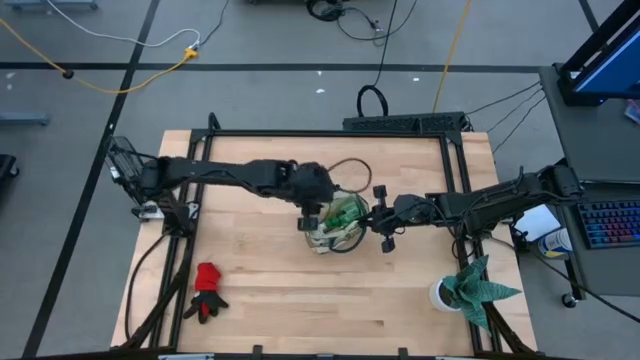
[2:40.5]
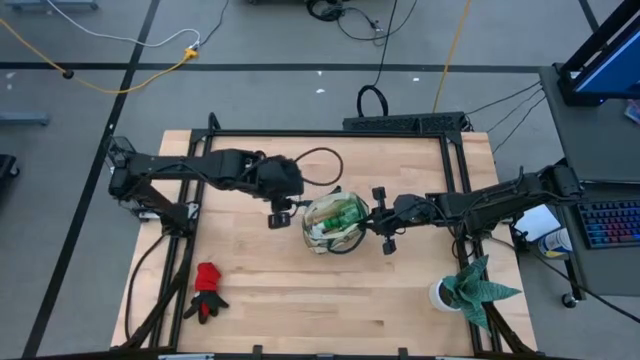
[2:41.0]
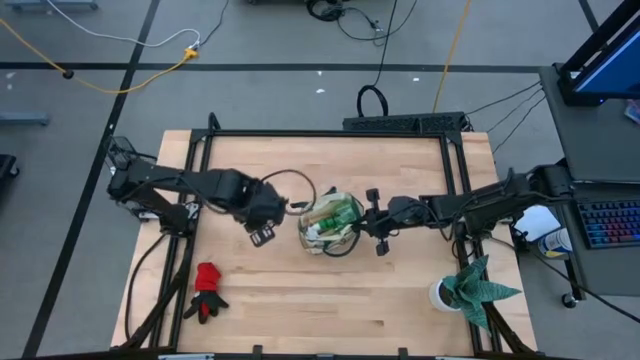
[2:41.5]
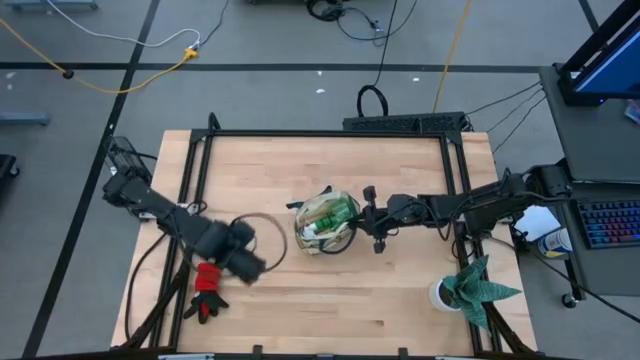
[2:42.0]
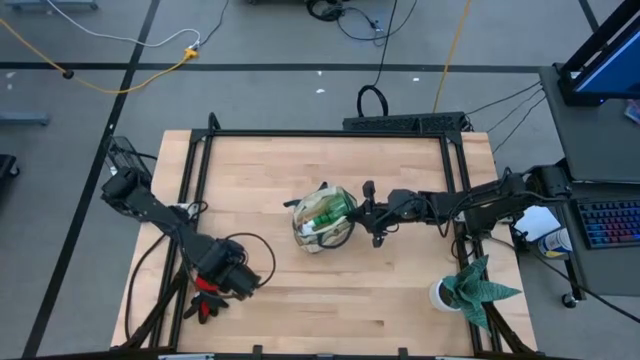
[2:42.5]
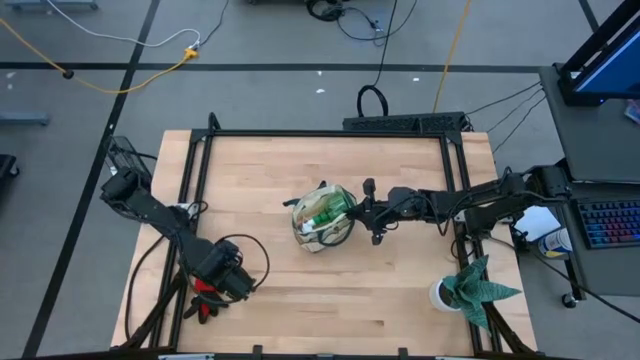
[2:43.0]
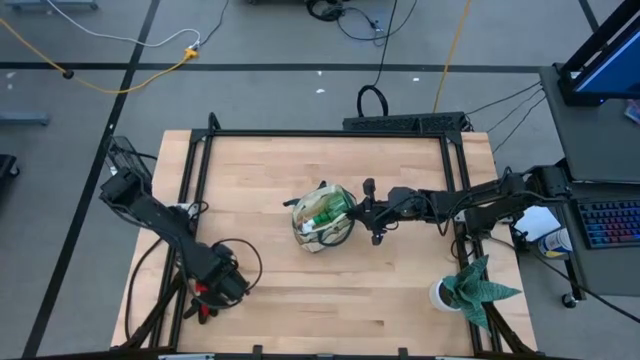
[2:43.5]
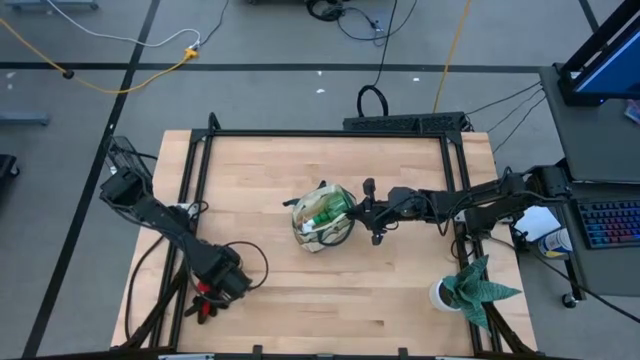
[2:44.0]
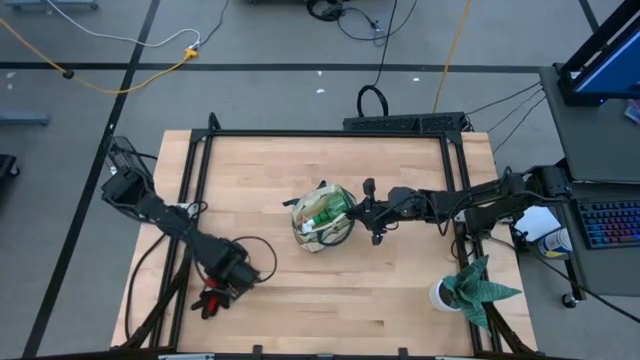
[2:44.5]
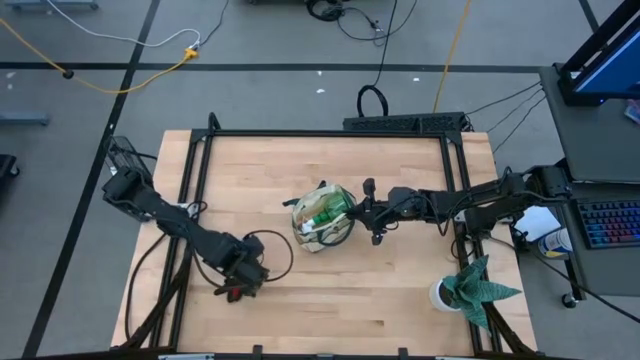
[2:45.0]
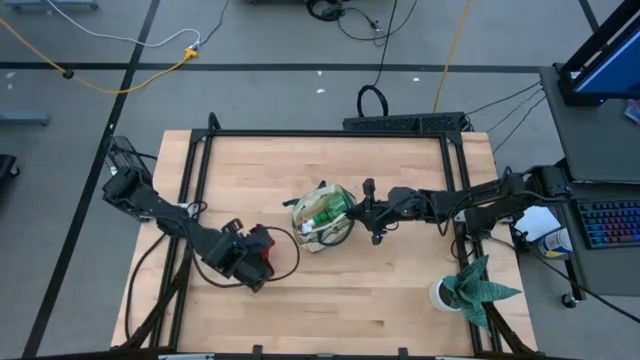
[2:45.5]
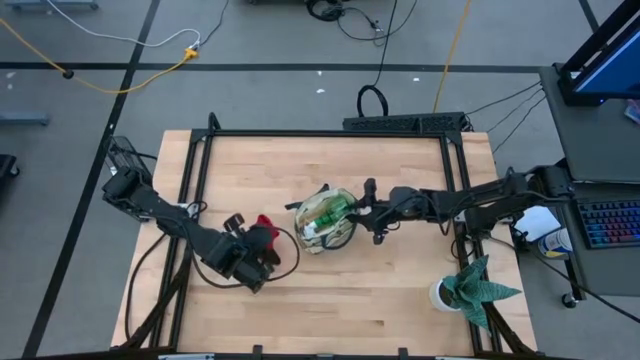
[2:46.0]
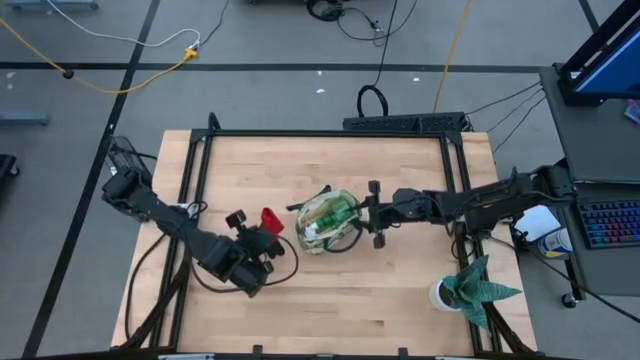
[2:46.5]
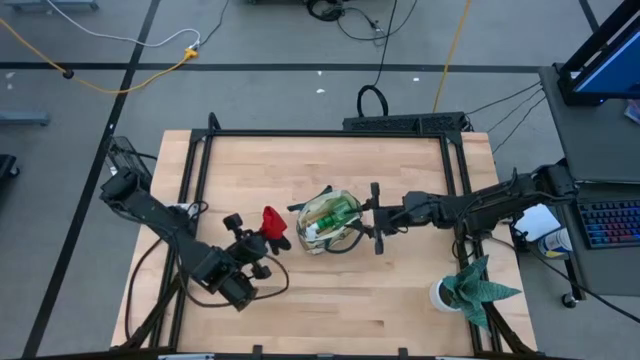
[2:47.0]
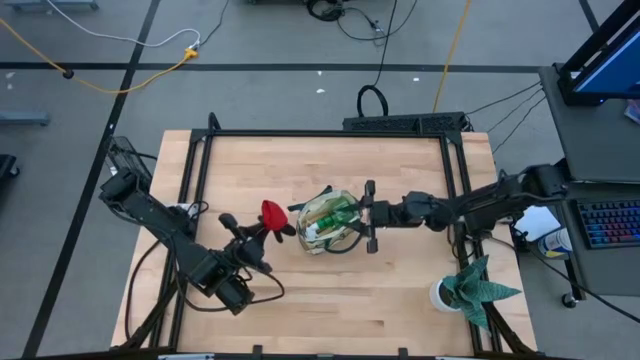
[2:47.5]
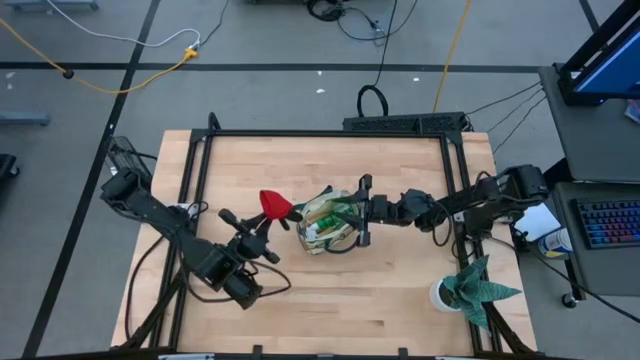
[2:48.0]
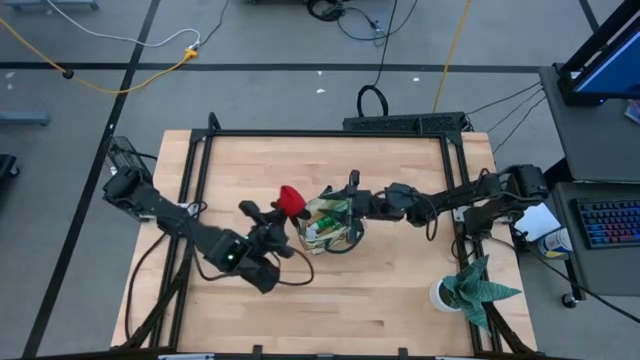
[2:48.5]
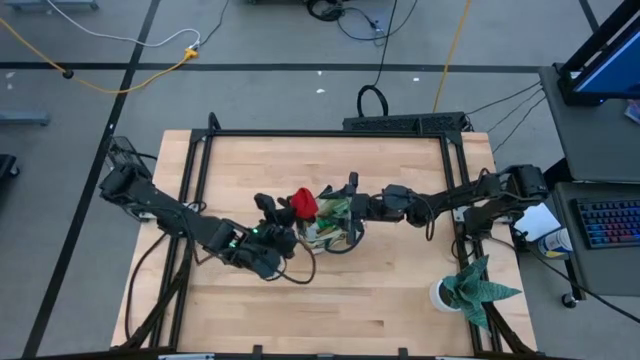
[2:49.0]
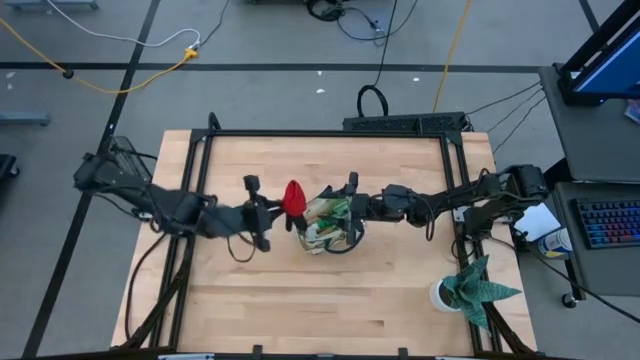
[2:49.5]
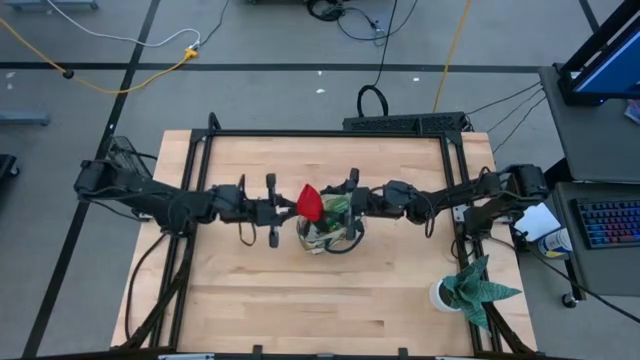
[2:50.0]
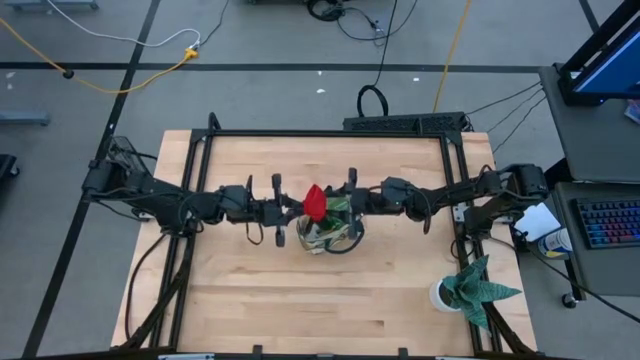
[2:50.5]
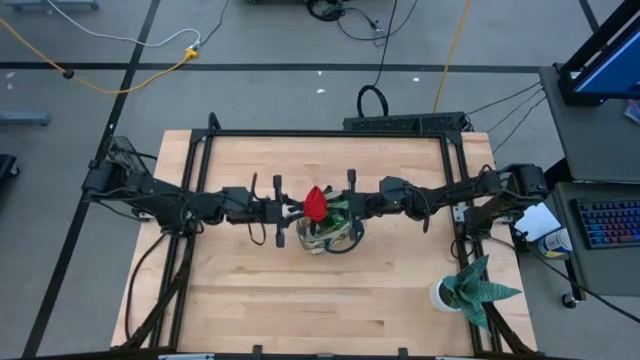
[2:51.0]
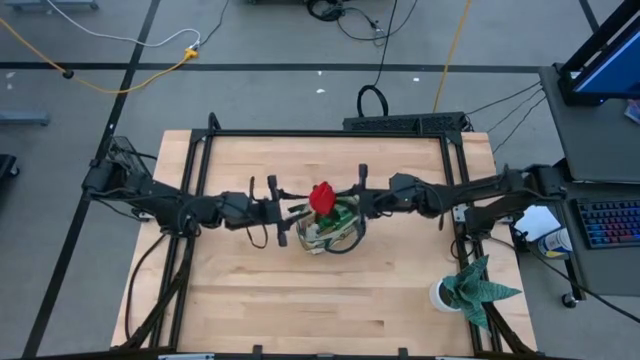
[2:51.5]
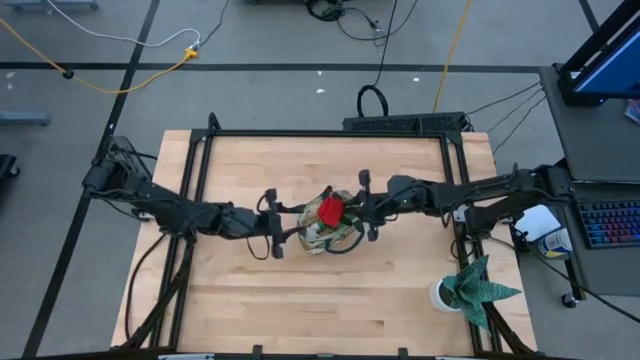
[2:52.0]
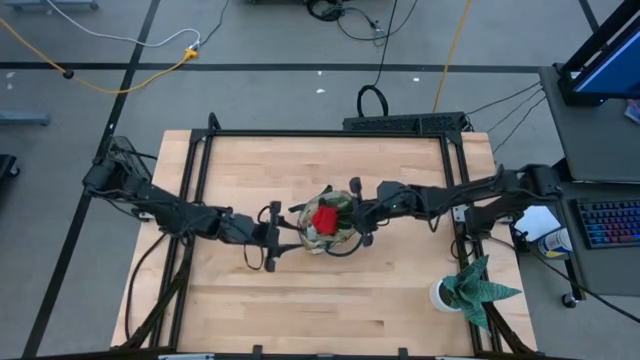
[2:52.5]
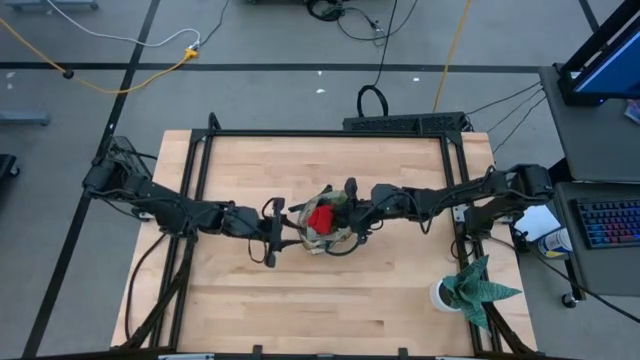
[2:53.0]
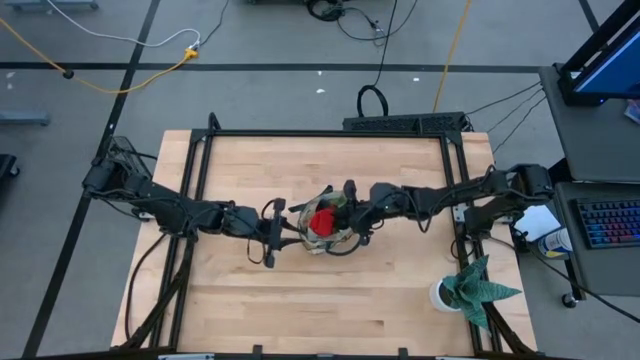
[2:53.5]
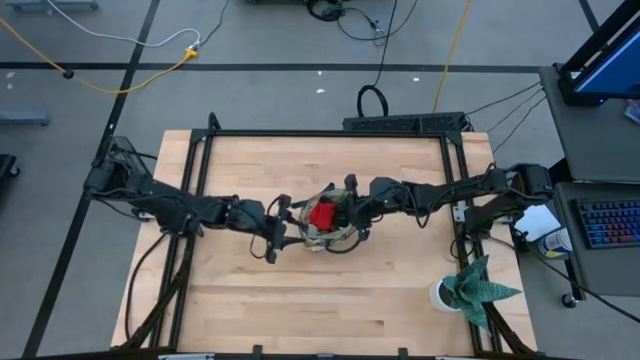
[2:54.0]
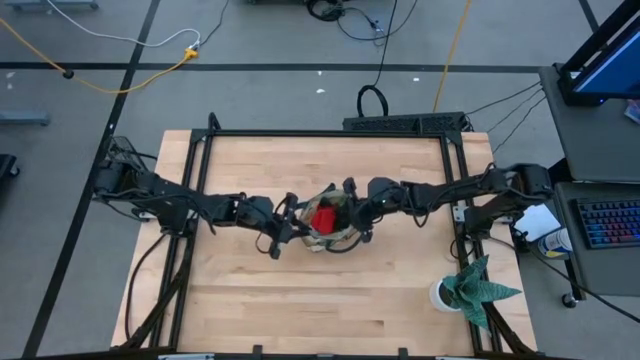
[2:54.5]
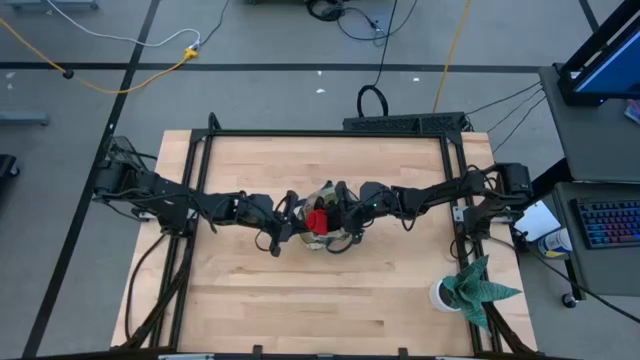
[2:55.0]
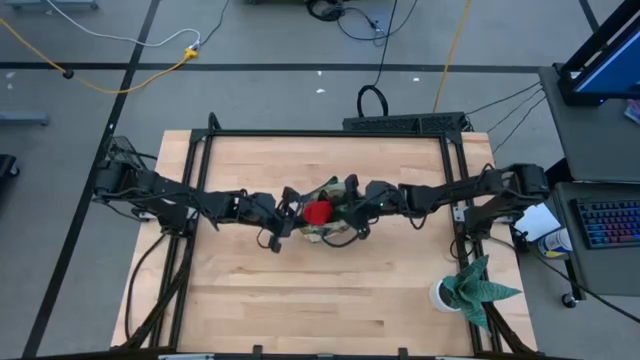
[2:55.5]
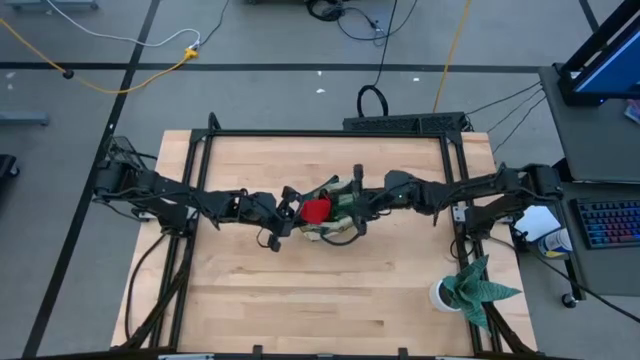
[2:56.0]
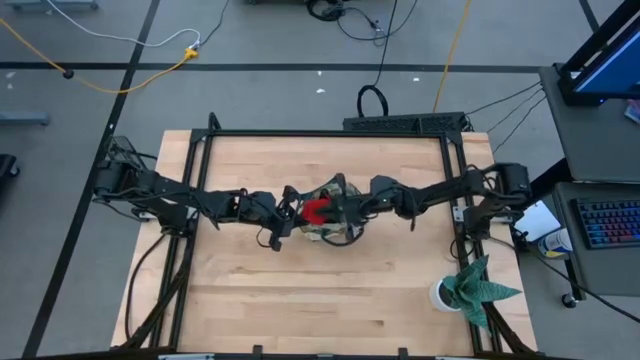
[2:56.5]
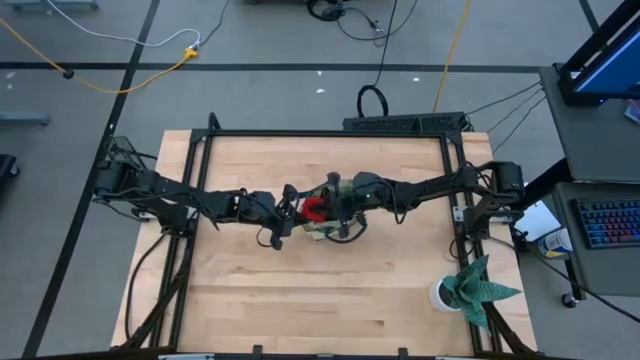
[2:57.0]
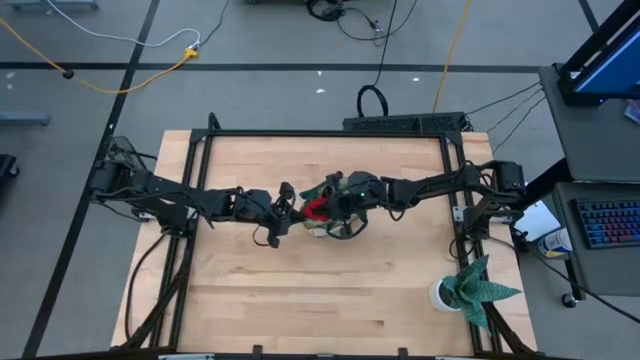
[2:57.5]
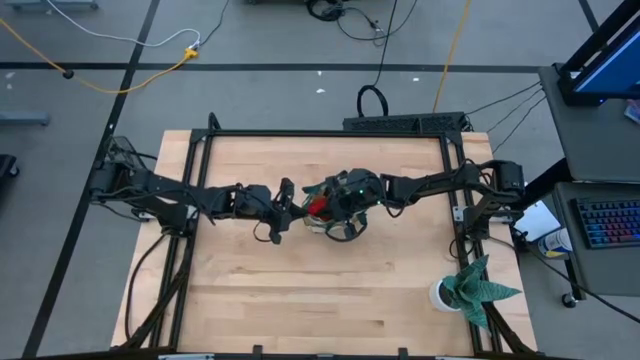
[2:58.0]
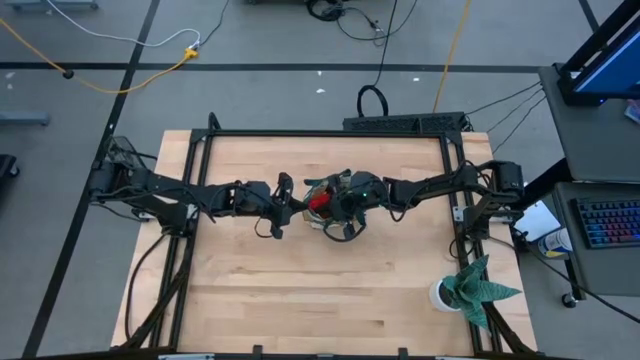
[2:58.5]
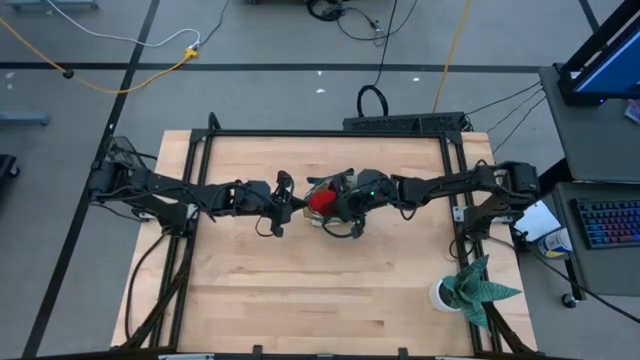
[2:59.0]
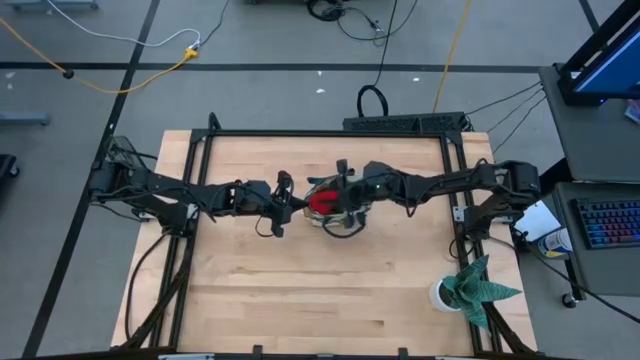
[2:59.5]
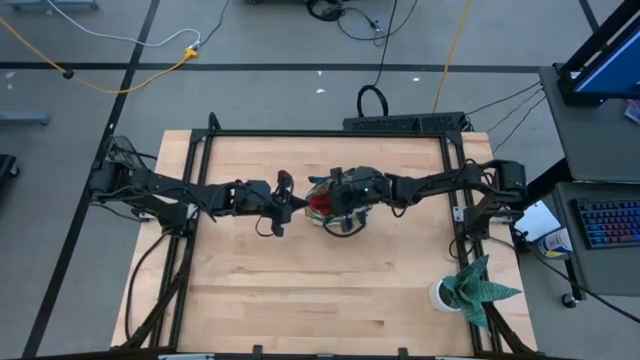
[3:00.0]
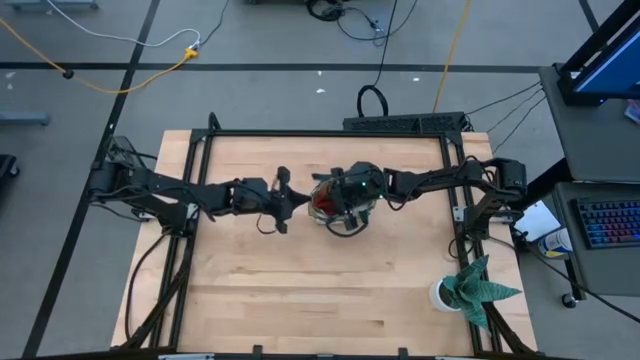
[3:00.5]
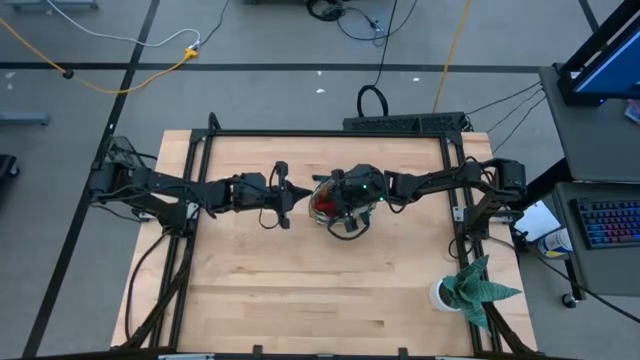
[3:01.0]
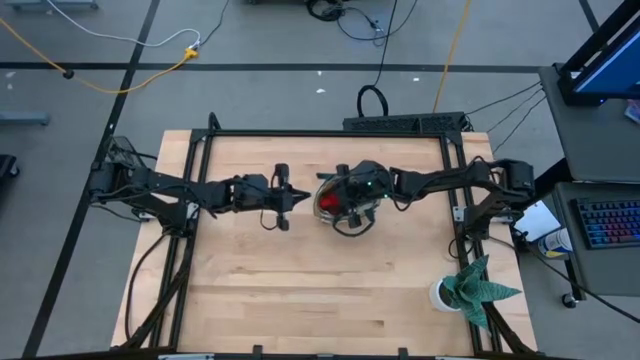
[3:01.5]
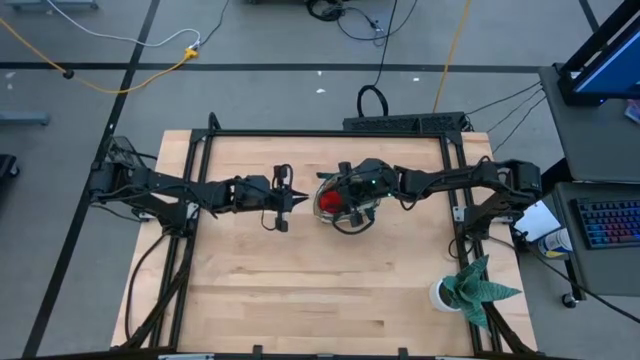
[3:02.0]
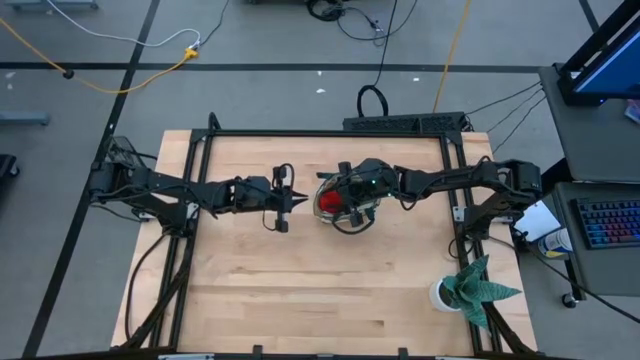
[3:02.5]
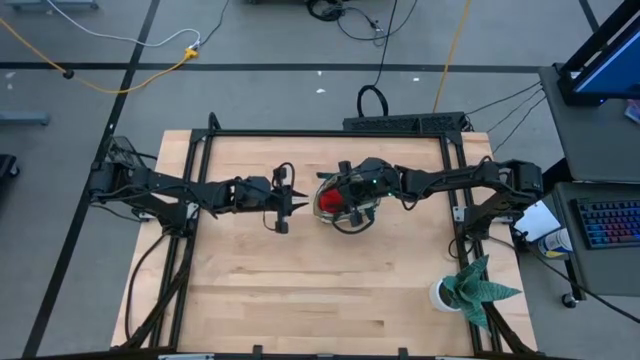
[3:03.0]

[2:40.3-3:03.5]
Task: Pick & Place Garden tools in Gardening bag
Put the red gloves into the brown gardening bag
